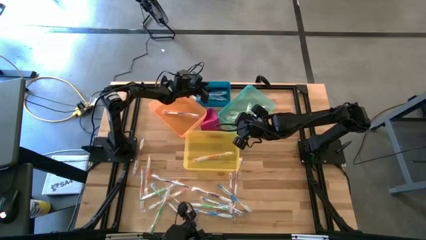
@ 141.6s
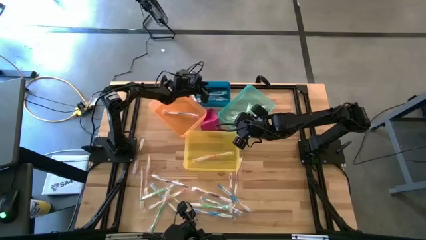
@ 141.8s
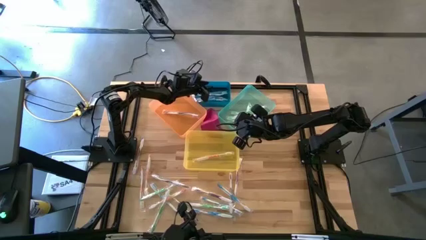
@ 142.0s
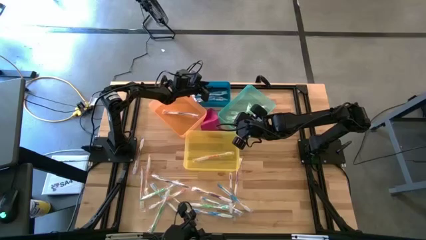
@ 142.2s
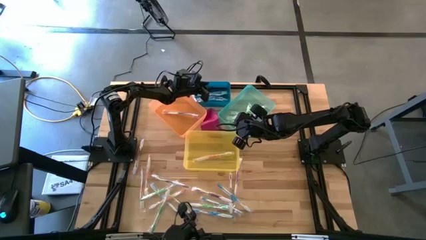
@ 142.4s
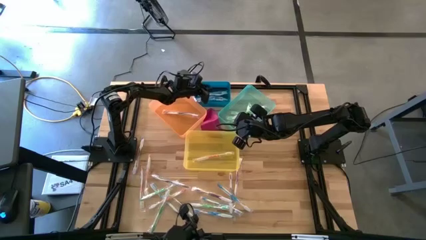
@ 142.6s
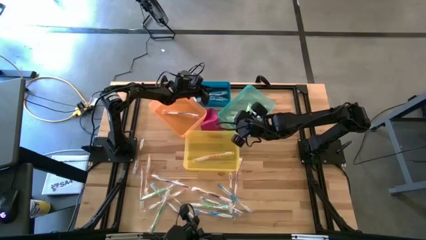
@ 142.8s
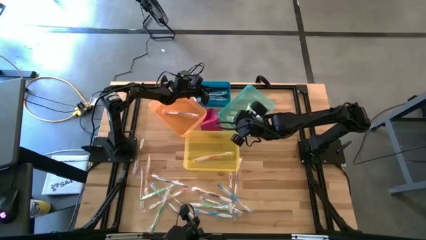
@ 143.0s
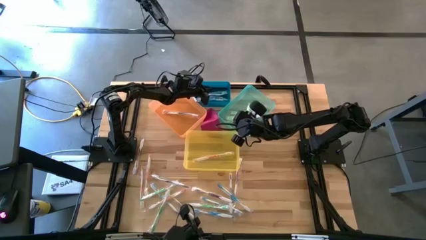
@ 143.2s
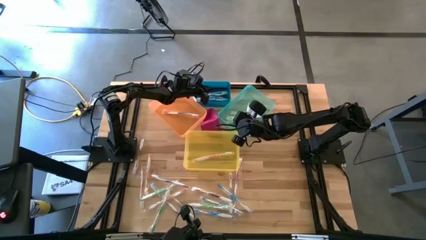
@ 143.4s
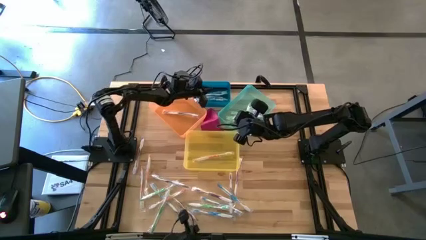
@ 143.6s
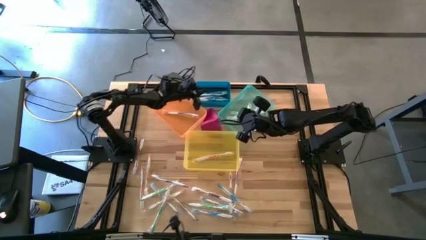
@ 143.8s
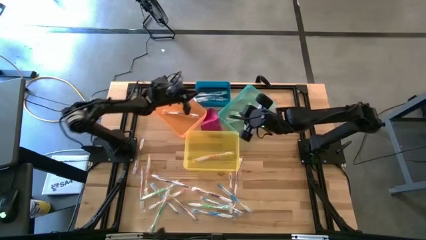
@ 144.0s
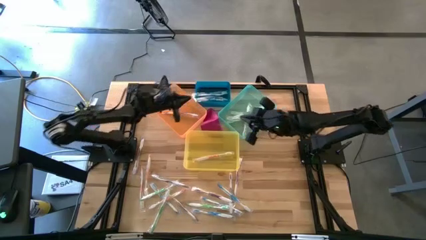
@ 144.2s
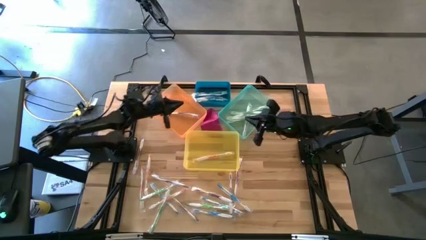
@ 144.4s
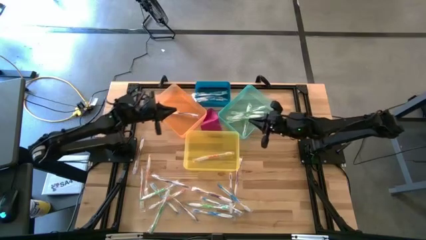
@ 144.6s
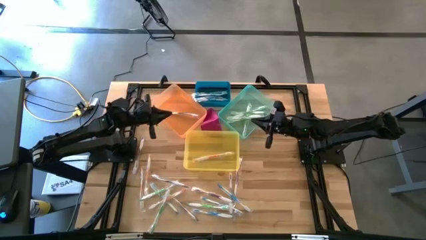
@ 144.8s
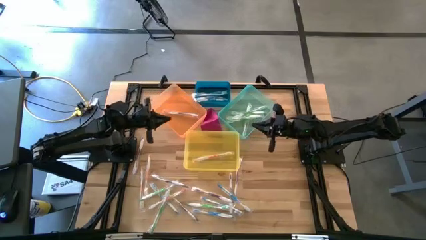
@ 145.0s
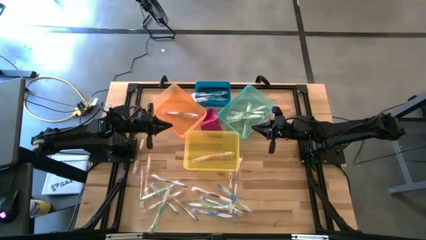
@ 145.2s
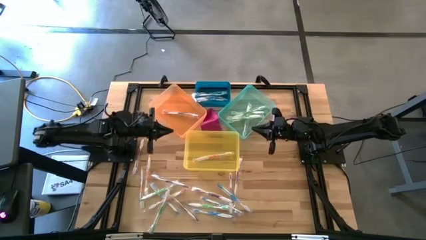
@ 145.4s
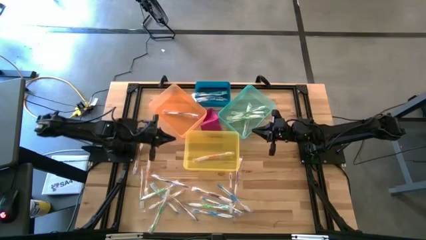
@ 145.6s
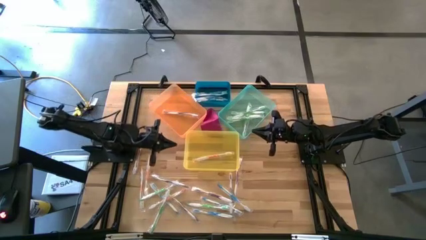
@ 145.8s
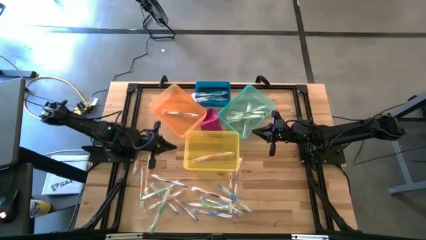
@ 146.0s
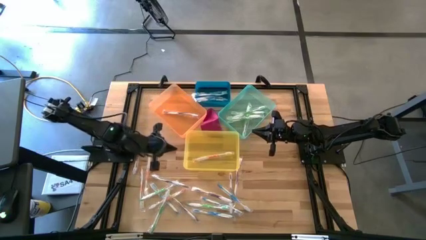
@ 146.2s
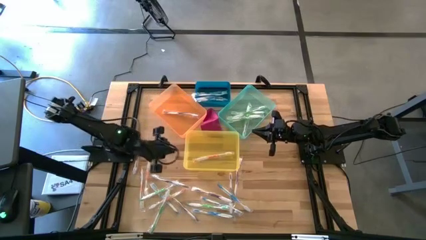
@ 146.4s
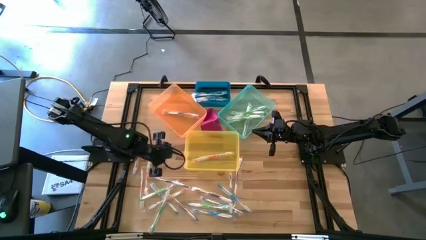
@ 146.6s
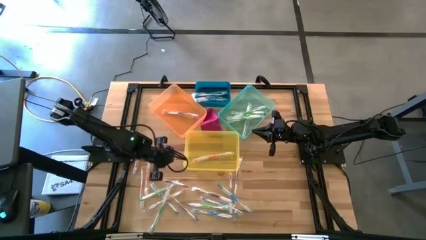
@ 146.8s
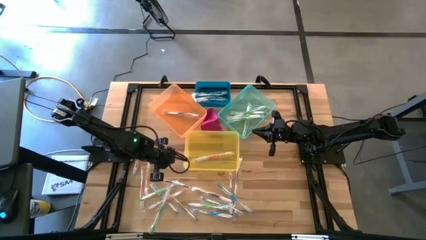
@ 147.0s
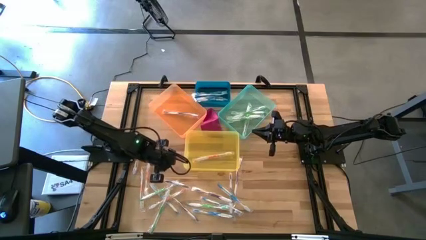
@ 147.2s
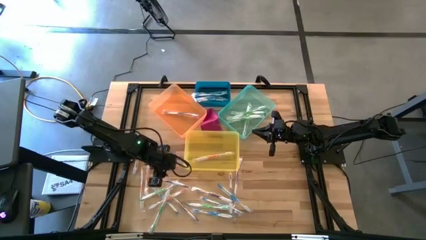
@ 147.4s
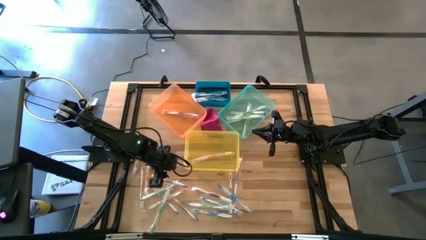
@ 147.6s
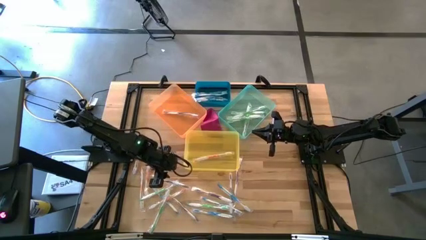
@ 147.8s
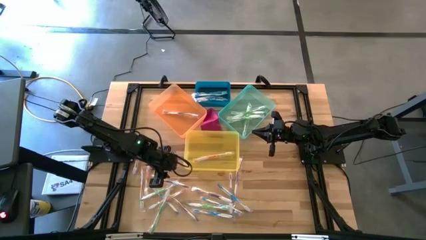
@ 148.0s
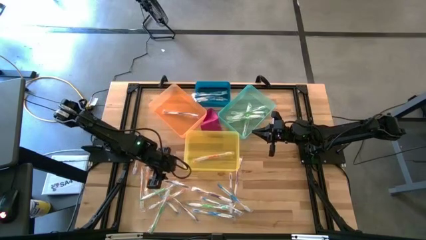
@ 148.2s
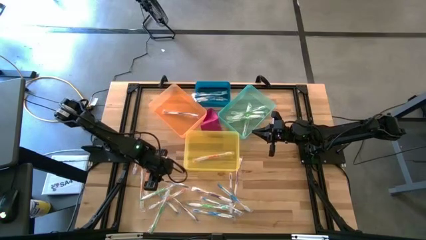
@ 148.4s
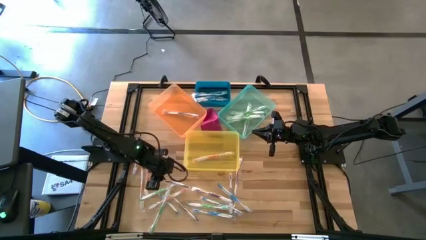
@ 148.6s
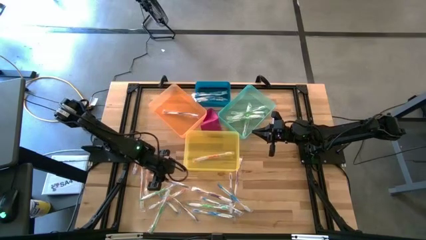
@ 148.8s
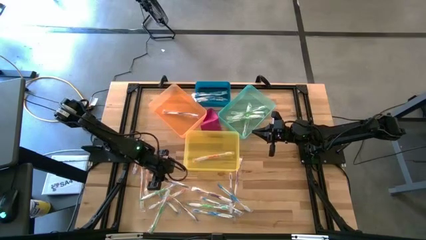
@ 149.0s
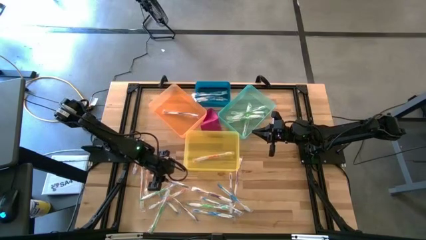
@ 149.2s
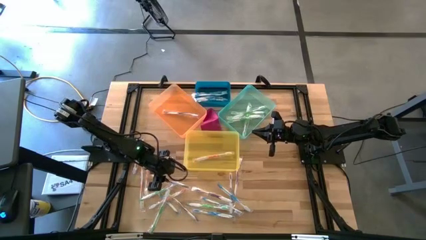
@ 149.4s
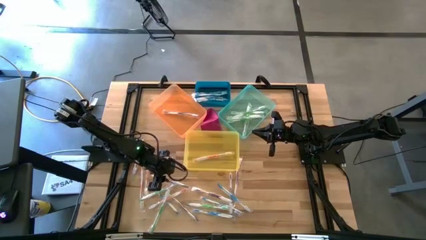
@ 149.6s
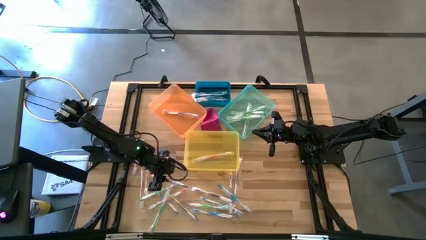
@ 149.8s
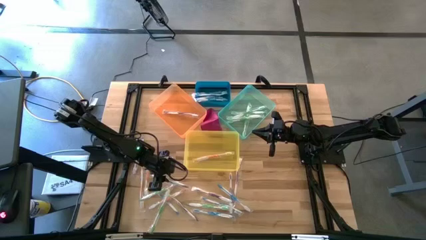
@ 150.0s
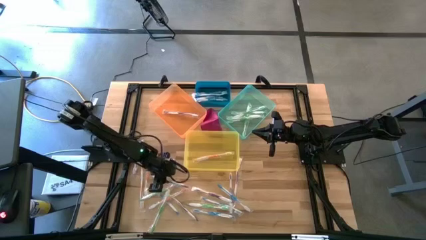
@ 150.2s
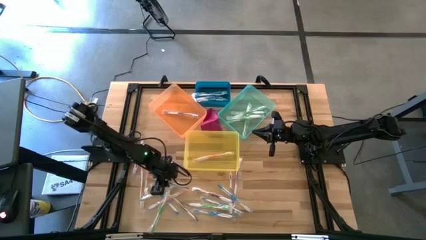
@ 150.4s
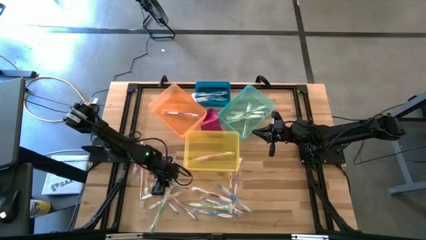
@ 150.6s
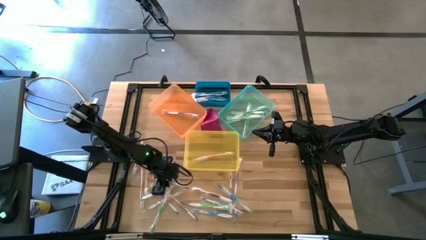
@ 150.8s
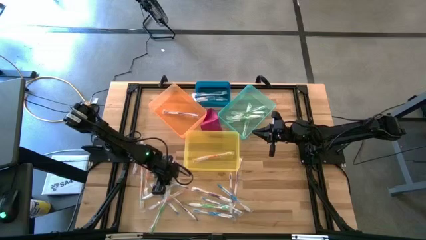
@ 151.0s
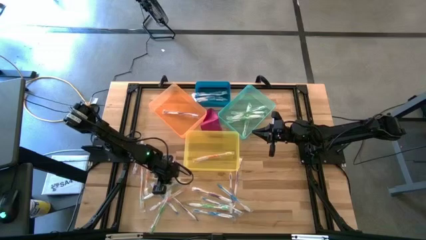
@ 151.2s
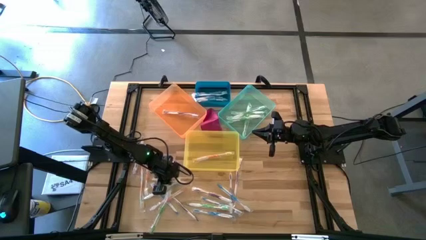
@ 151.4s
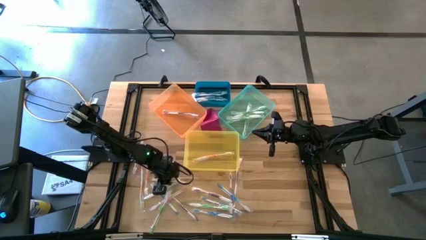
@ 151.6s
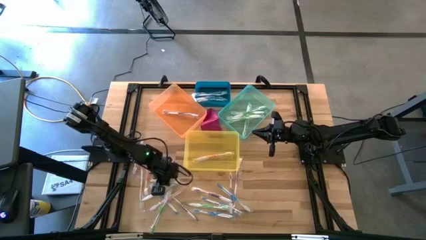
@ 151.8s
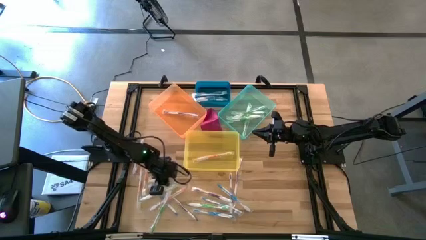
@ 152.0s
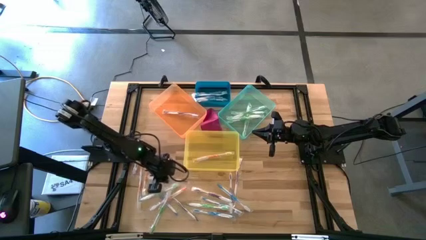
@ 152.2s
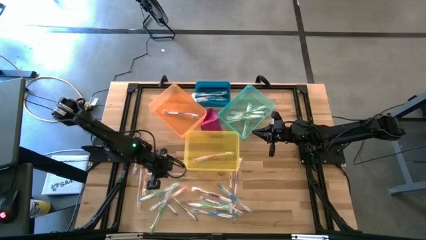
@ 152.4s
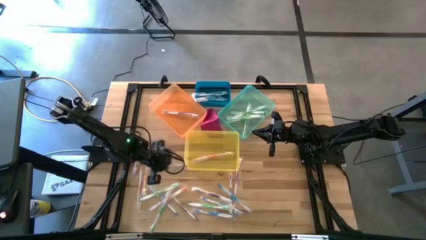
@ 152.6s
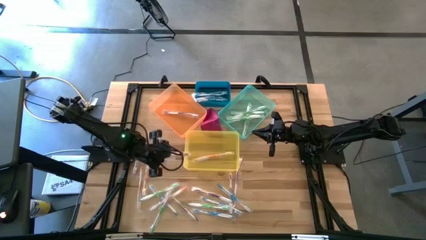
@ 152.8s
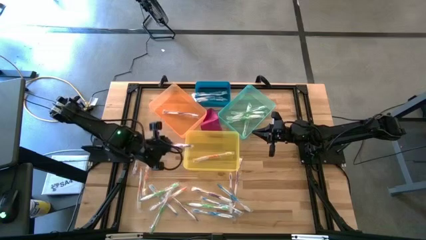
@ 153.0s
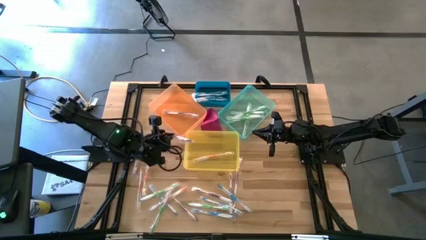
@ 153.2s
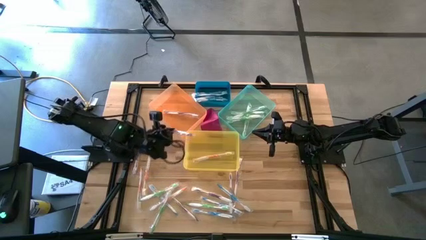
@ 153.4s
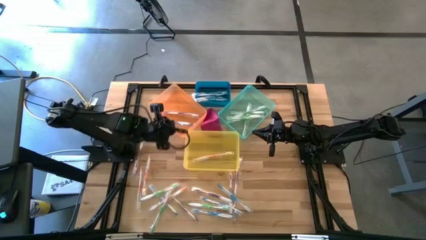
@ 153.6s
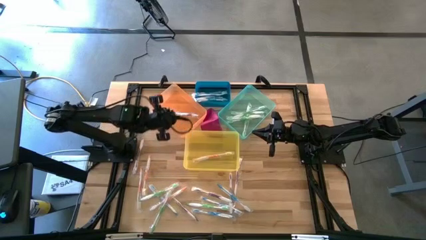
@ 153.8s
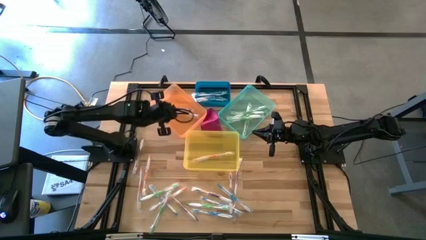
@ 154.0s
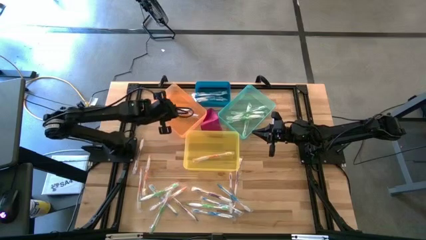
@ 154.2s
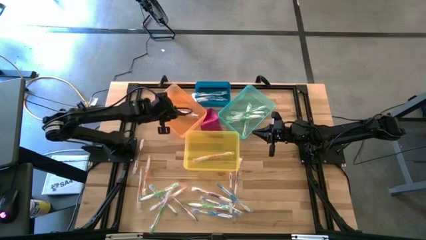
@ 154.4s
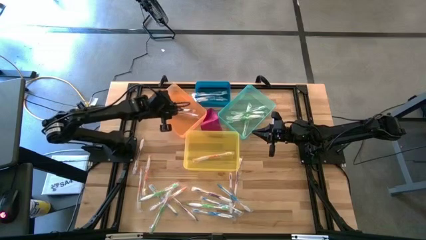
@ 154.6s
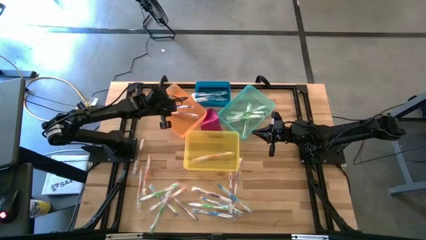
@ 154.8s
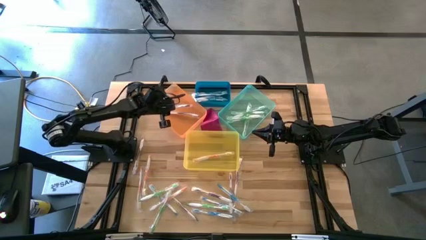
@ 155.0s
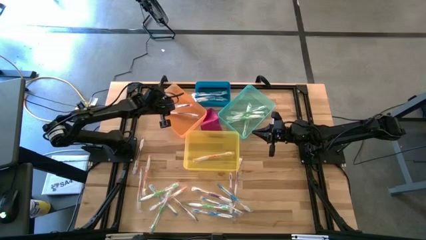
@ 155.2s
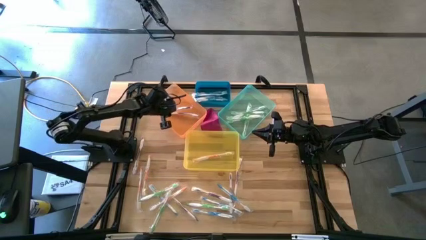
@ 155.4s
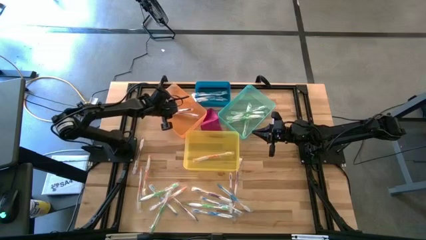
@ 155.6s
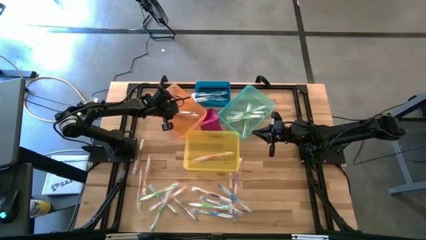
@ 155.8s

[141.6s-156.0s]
Task: Pick & Place Toothbrushes
Put the purple toothbrush into the orange bin
